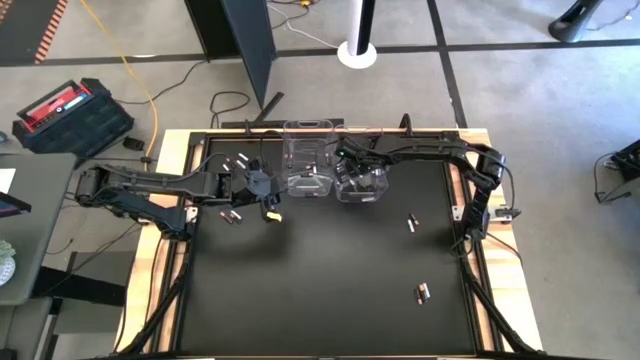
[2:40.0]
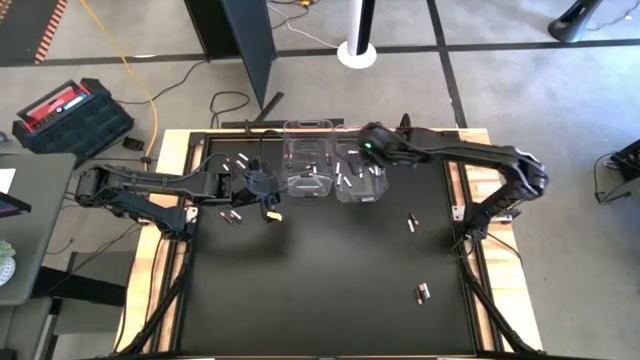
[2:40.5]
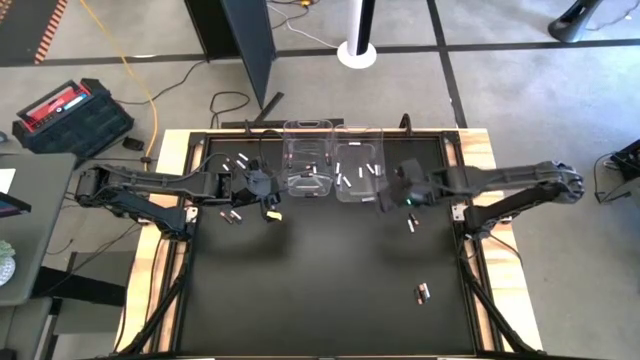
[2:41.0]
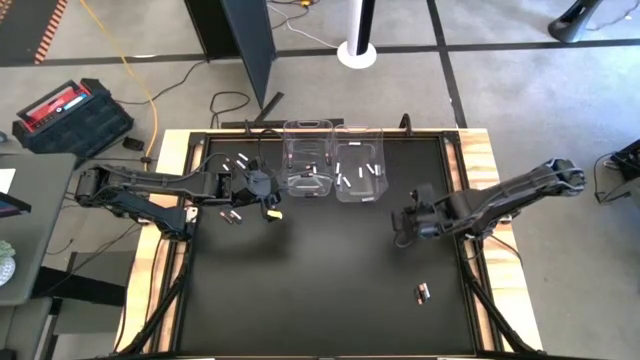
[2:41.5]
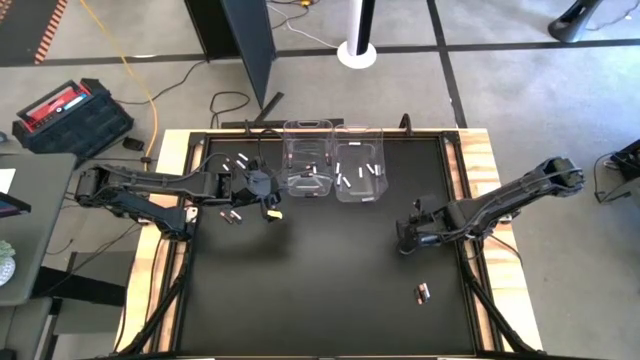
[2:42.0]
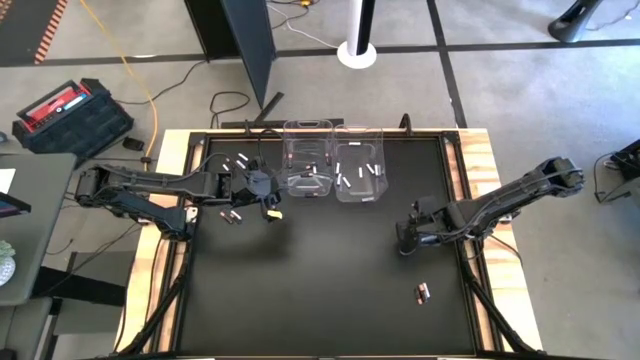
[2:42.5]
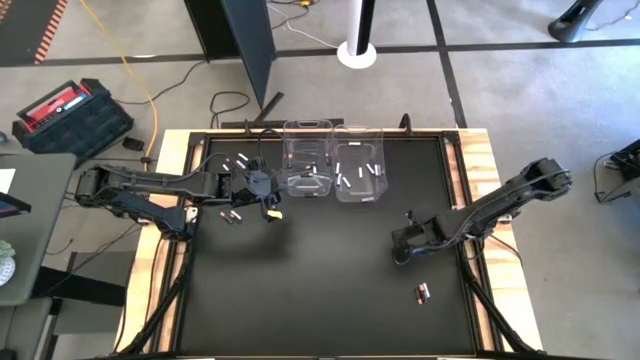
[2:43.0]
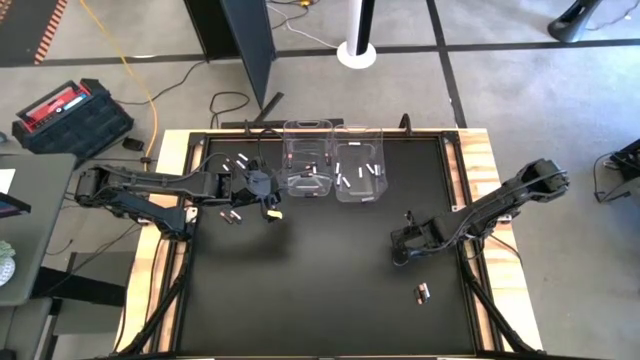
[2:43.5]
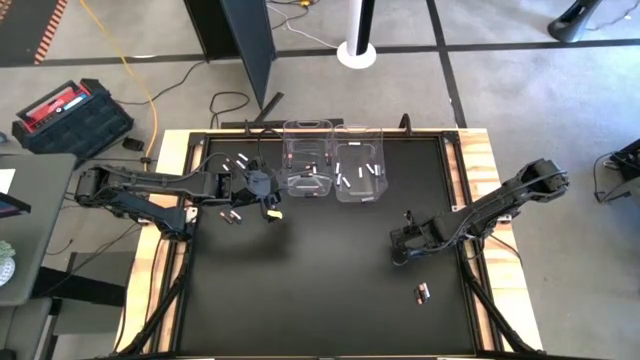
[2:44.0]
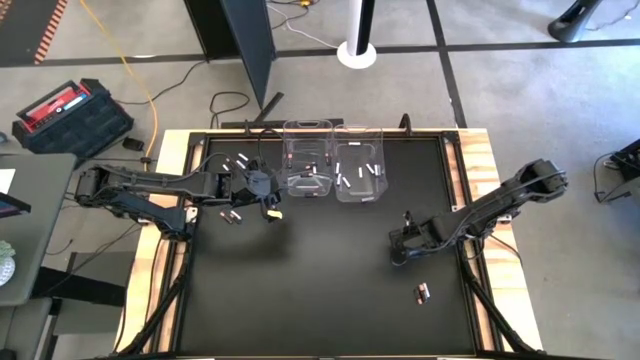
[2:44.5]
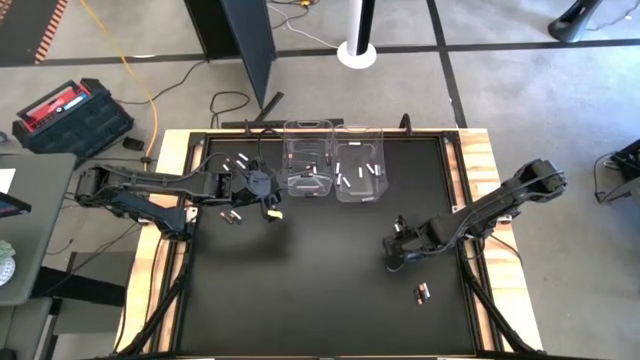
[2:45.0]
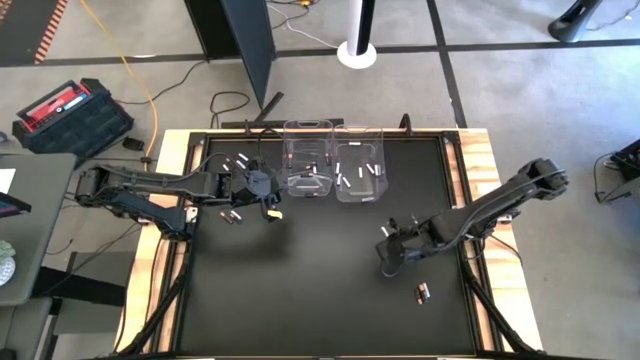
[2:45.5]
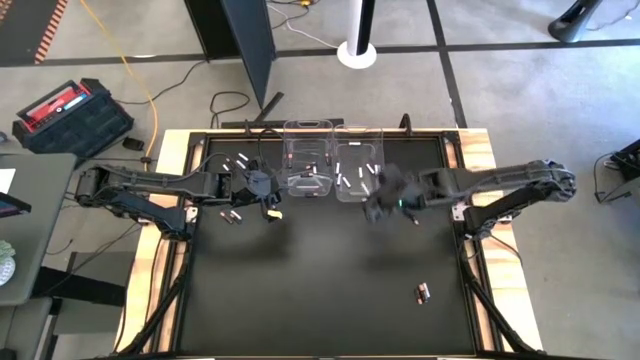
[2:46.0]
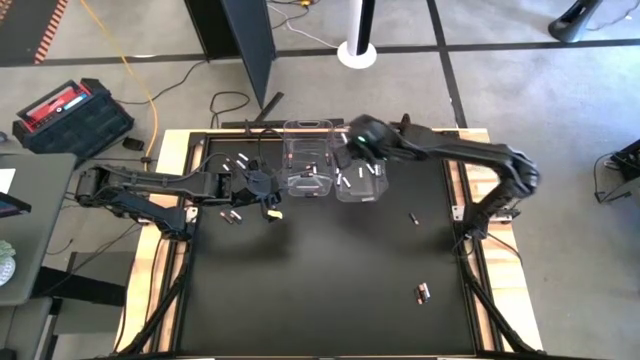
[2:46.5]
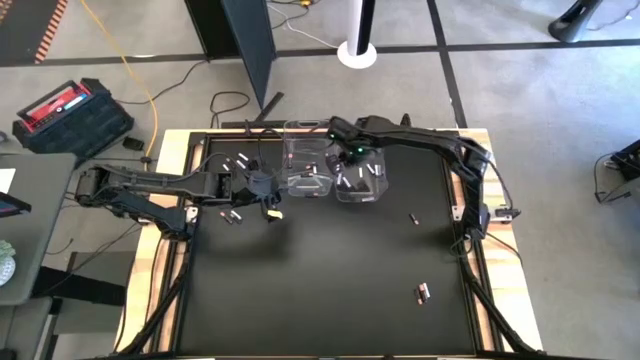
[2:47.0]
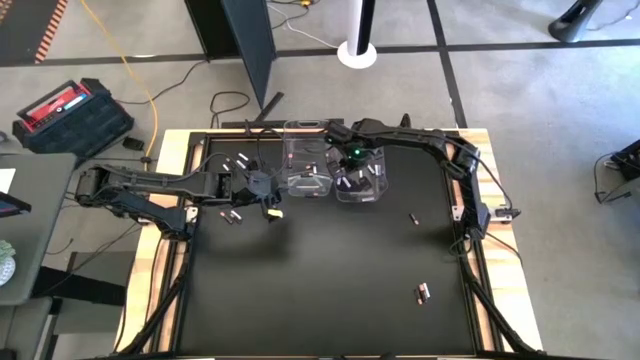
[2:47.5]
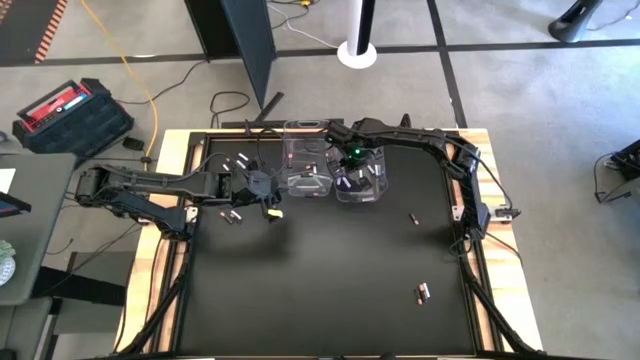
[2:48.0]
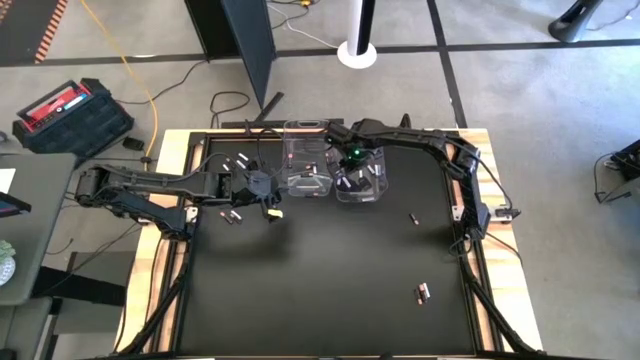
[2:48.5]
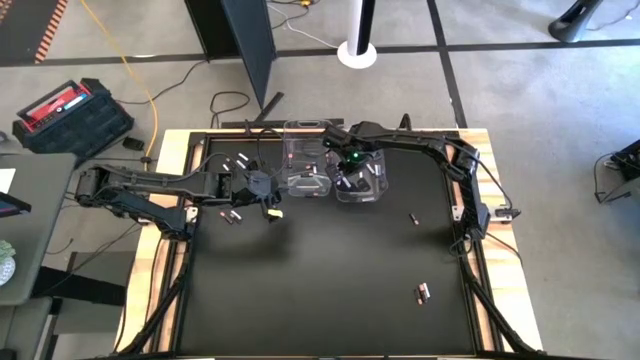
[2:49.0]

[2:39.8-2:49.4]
Task: Sort batteries
Put the white battery into the right transparent bin

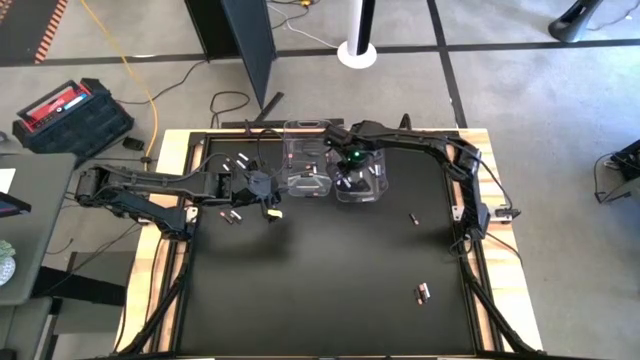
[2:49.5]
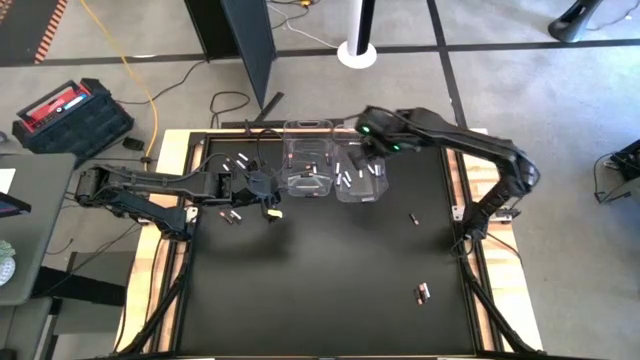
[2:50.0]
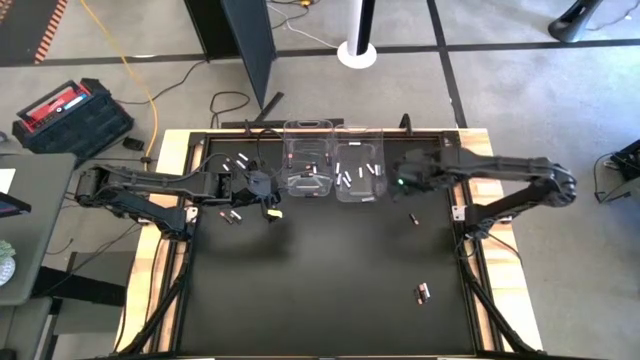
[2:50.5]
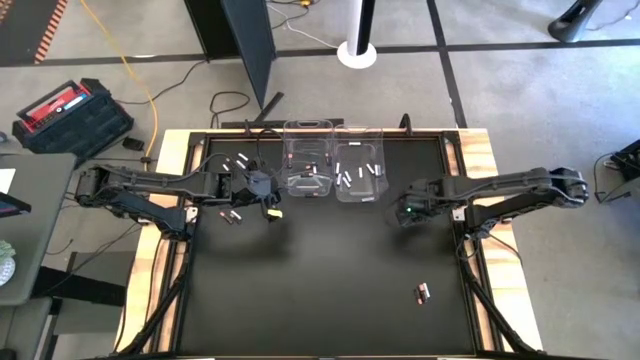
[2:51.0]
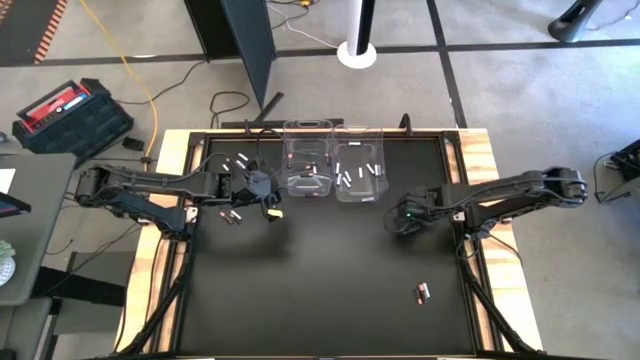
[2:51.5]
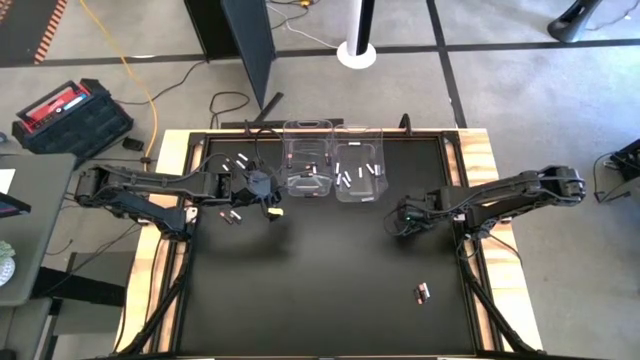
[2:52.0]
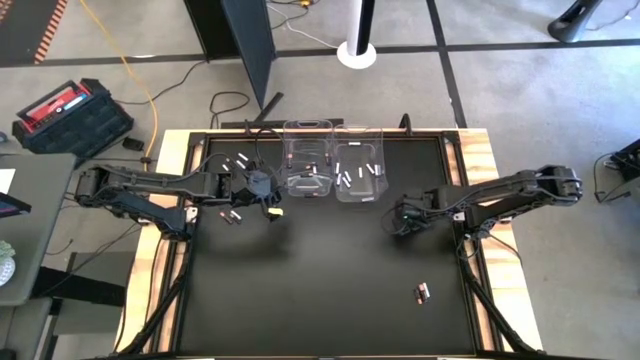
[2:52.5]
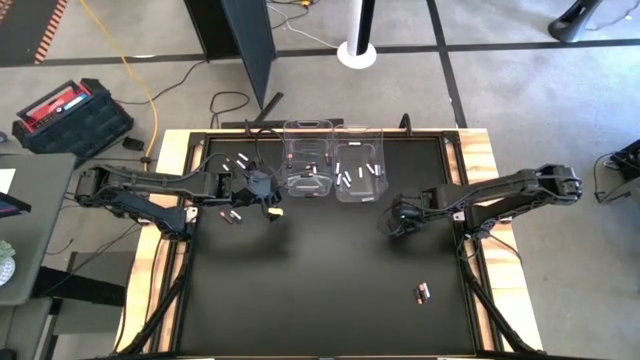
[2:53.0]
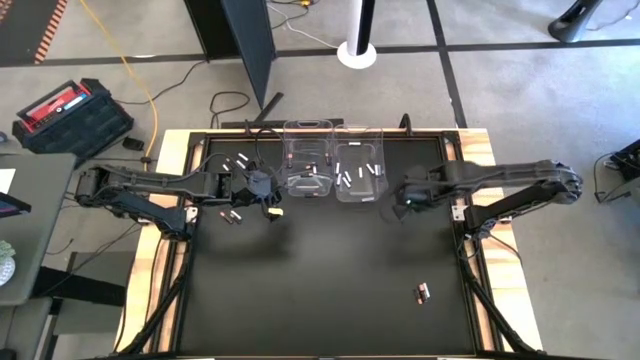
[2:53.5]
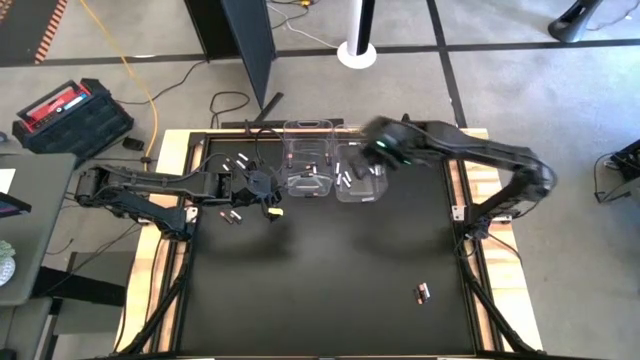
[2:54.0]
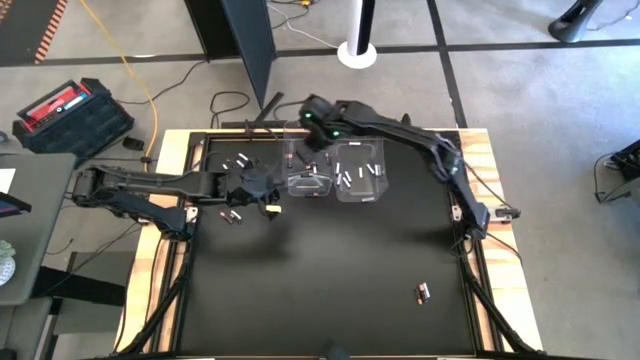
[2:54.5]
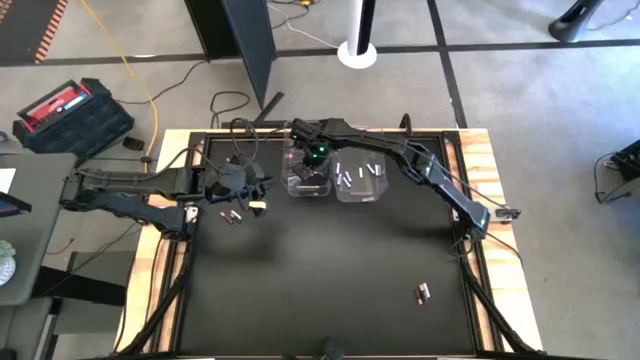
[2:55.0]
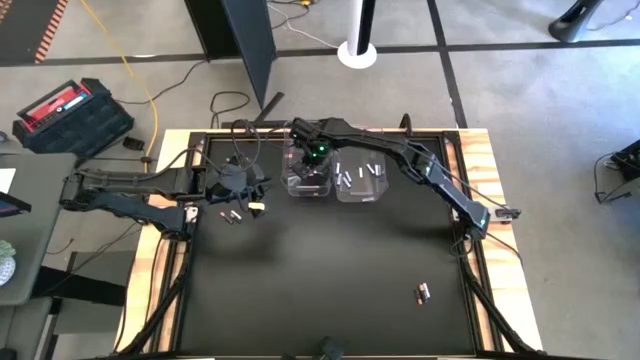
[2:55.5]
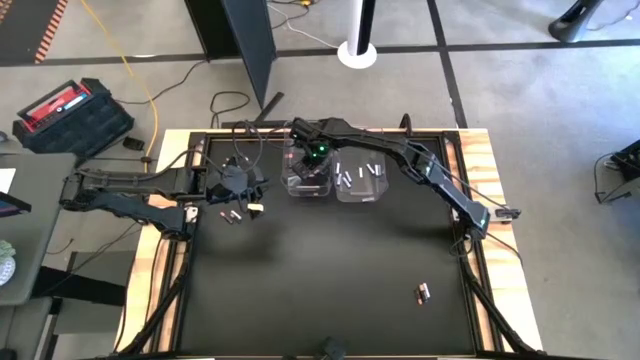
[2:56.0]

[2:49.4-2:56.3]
Put the black battery into the left transparent bin

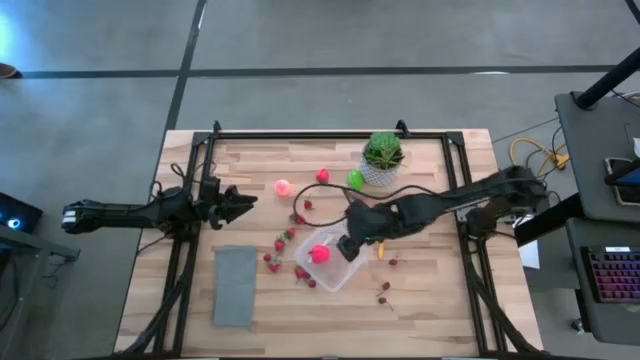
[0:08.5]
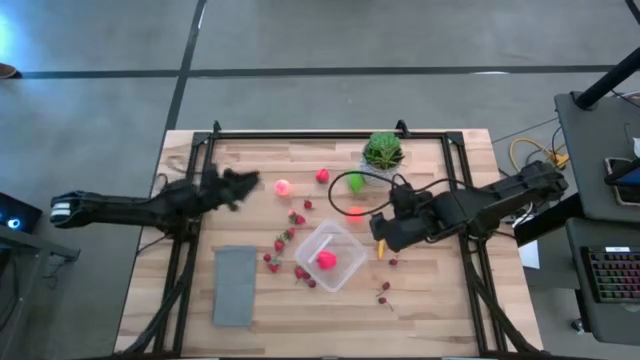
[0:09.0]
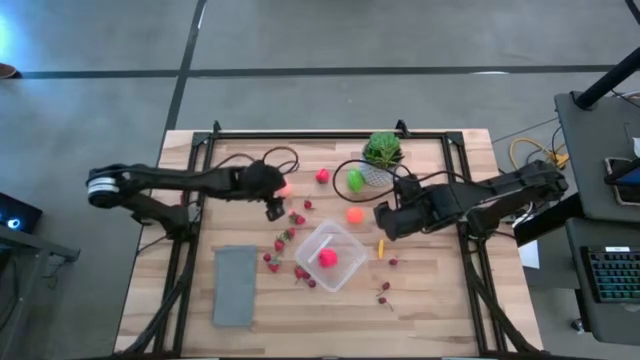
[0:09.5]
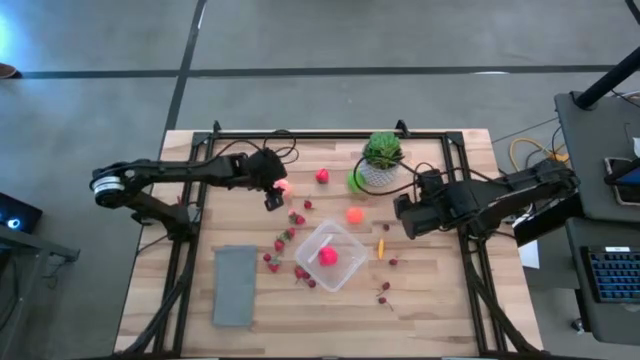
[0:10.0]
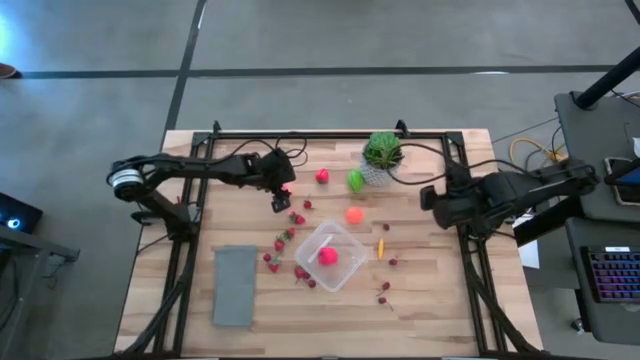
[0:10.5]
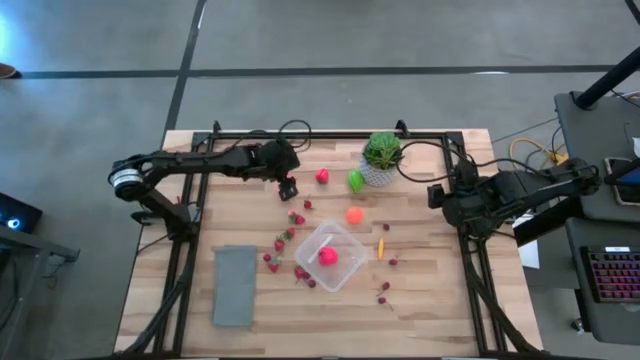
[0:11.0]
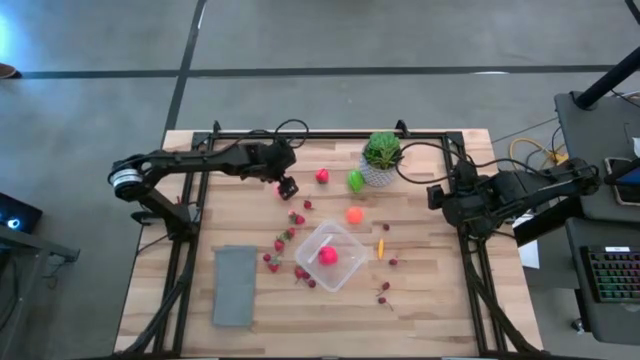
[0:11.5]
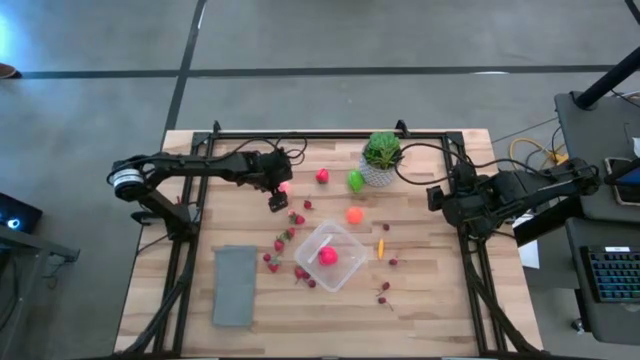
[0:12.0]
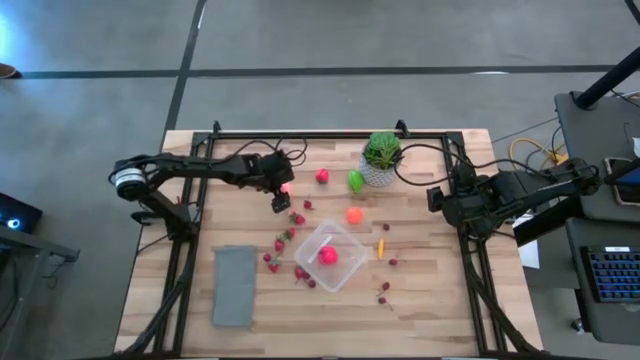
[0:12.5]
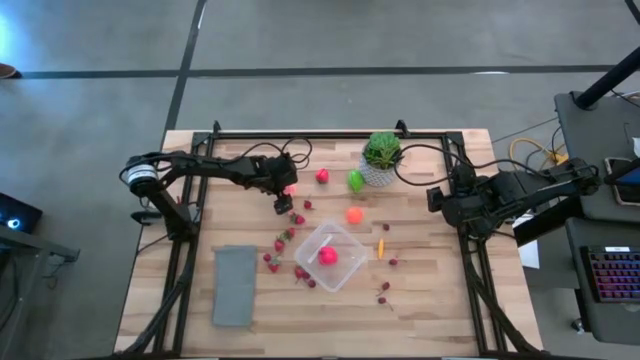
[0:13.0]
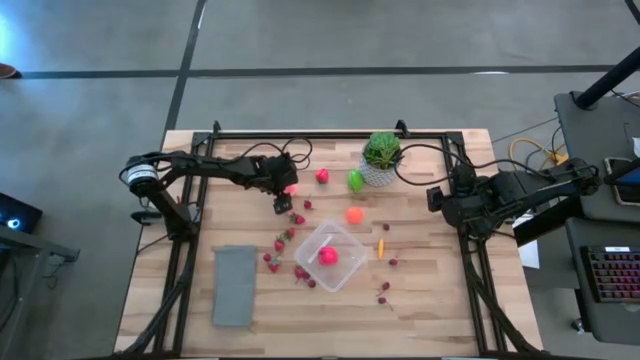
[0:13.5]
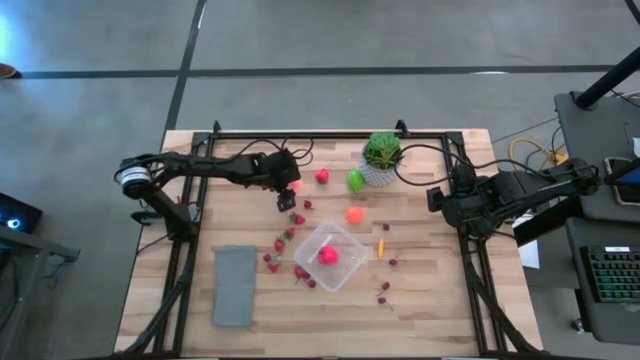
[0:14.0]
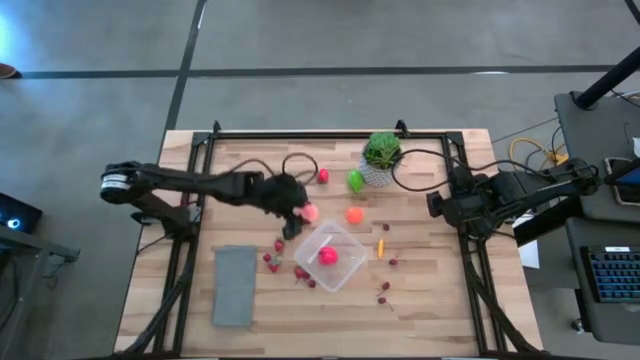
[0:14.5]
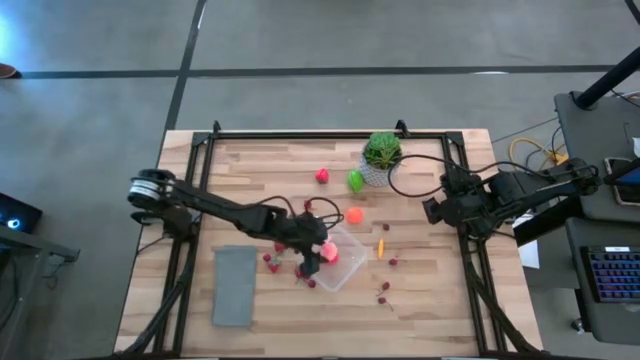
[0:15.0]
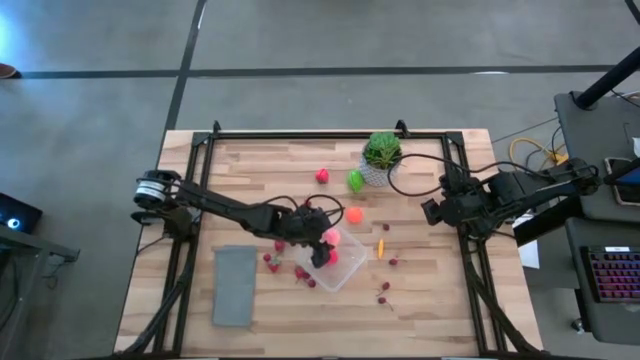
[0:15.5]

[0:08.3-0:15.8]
Task: Pick and placing Produce into tupperware
Put the peach into the transparent bin
